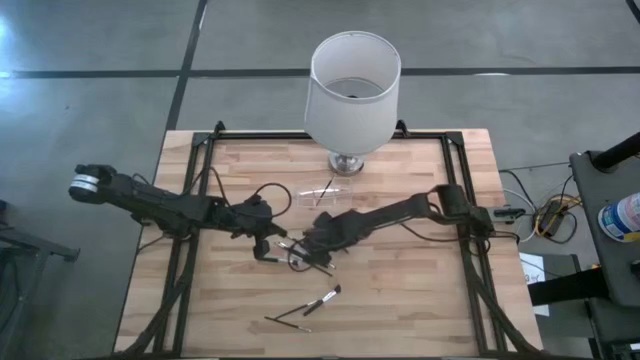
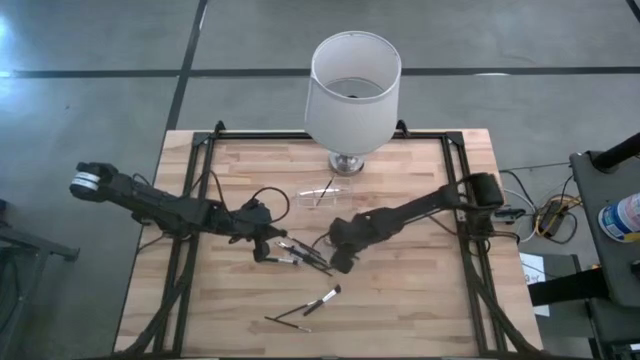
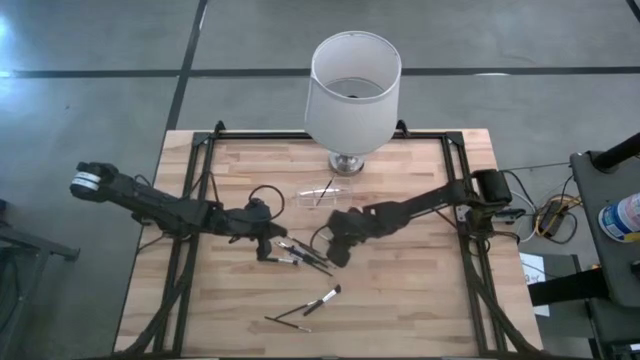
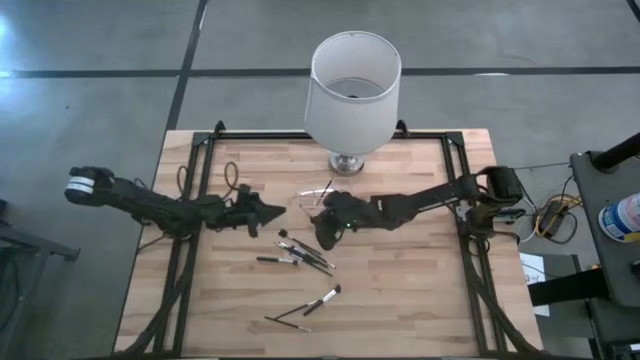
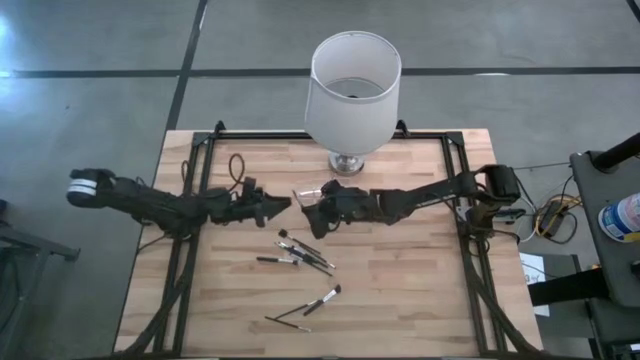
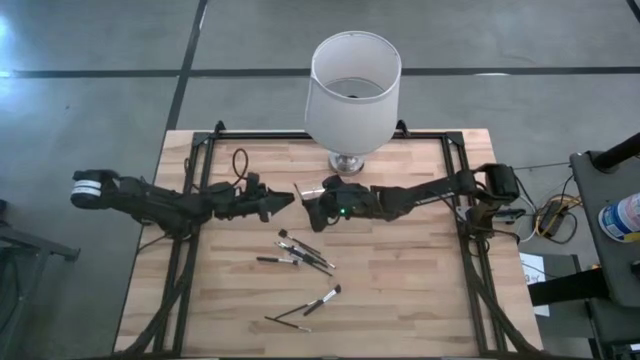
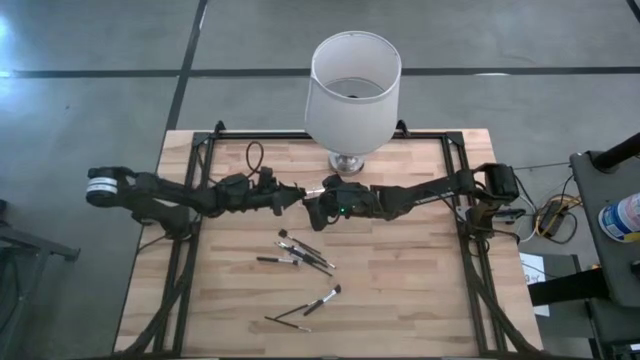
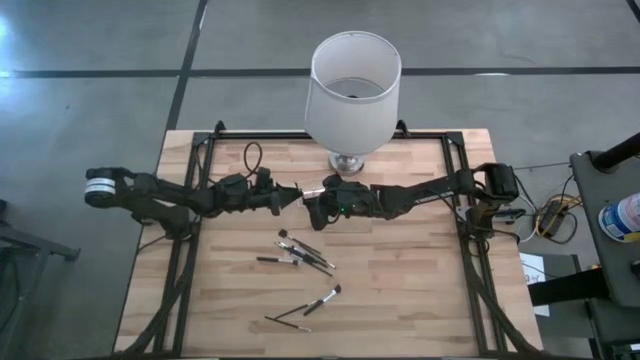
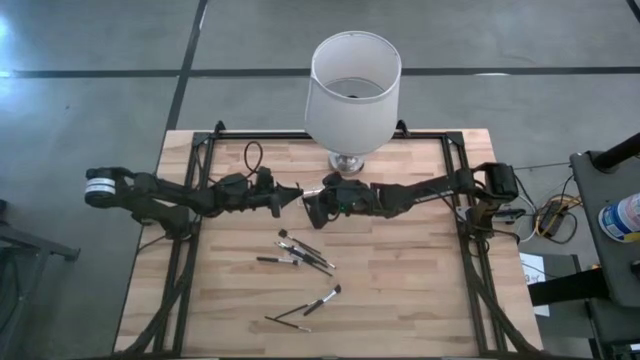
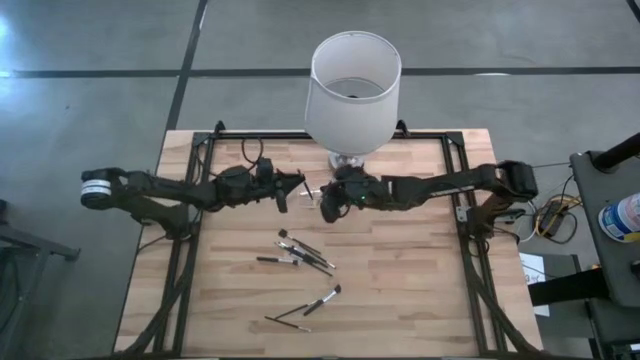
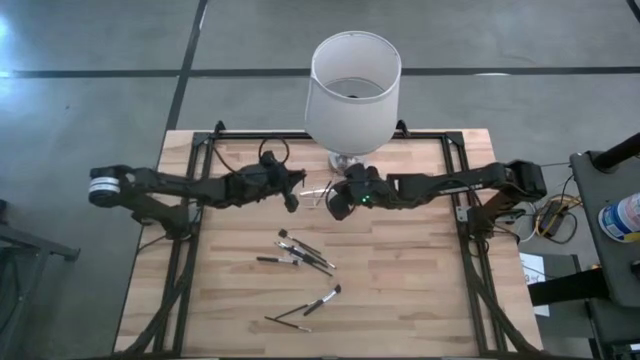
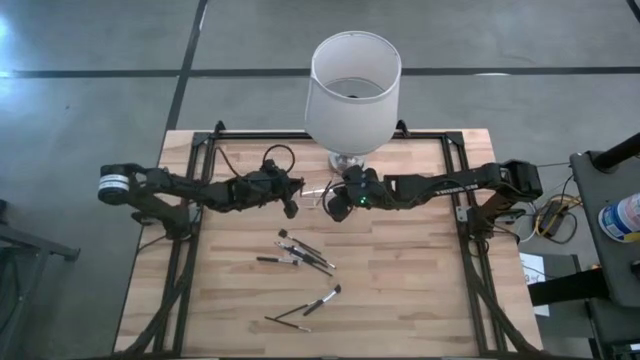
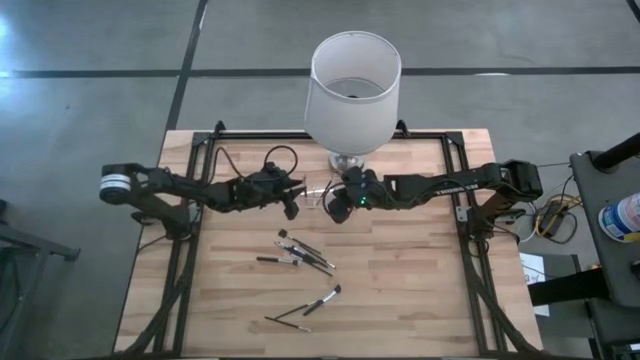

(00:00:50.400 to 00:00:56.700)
Task: Put items in baskets/containers
Put the eyeshadow brush into the transparent organizer

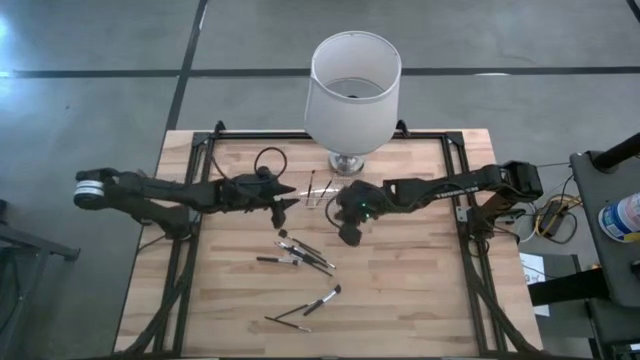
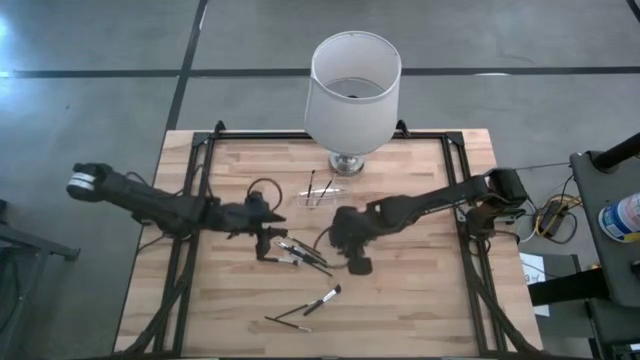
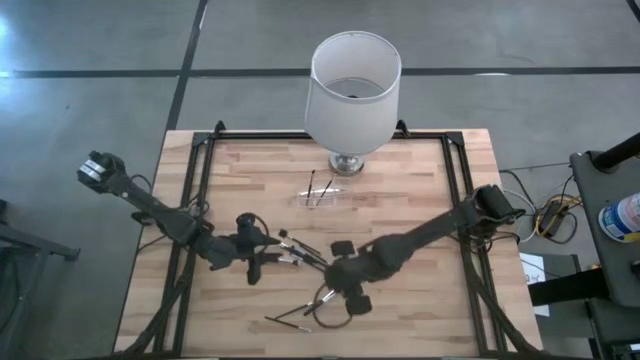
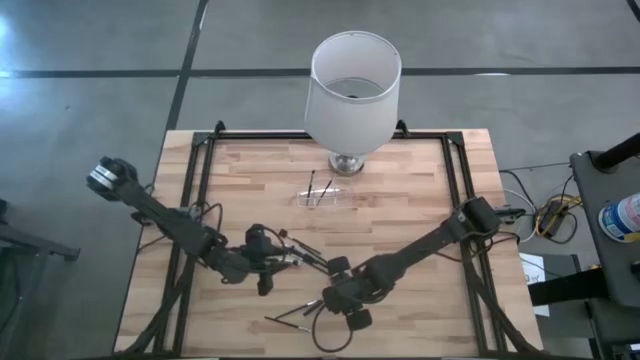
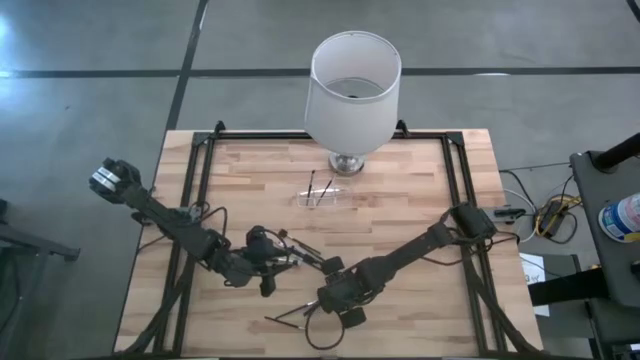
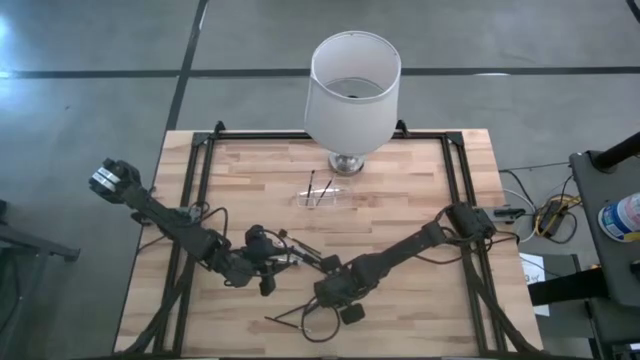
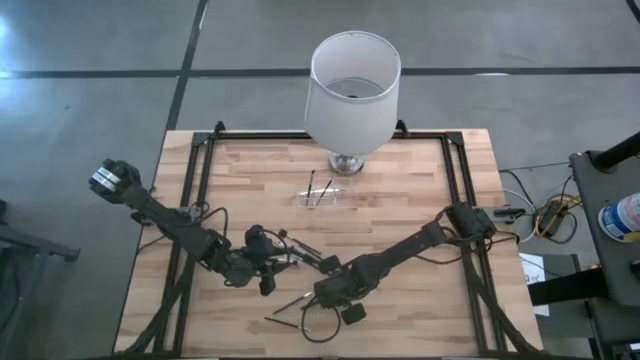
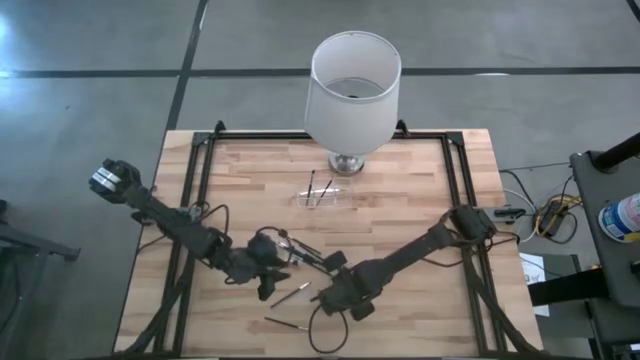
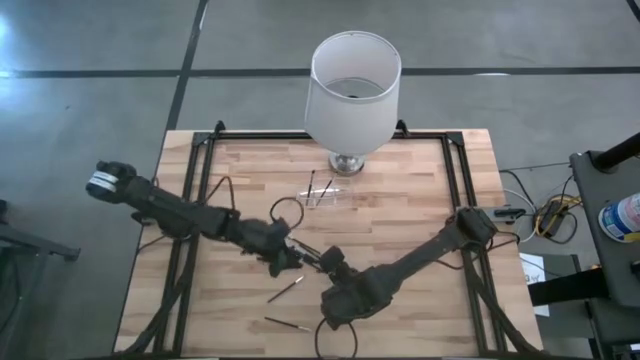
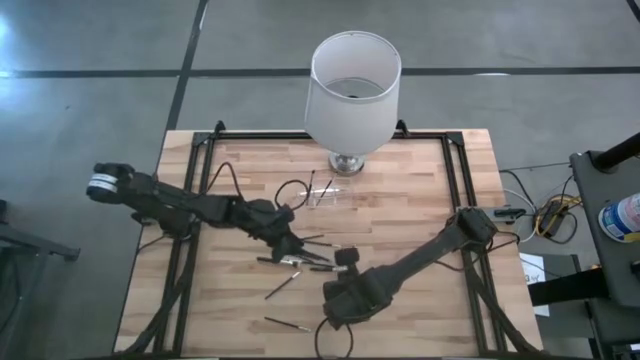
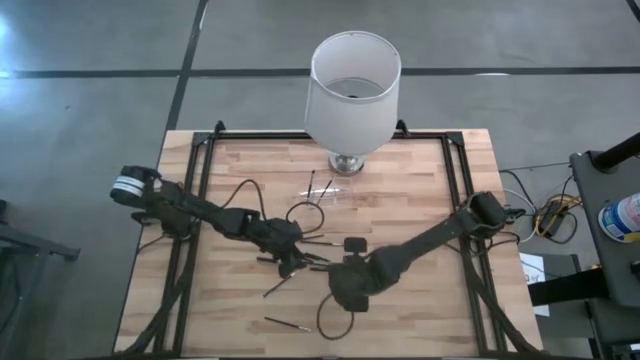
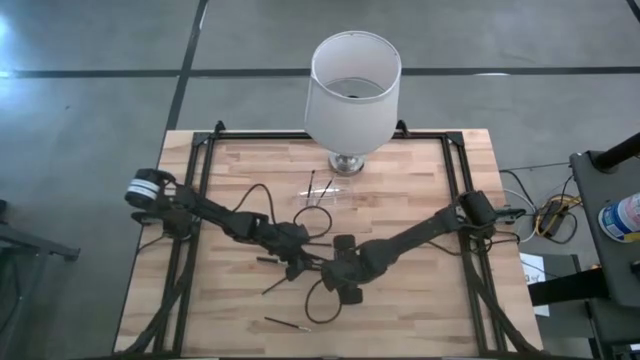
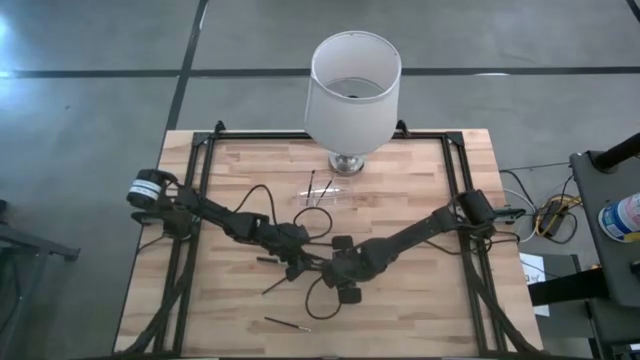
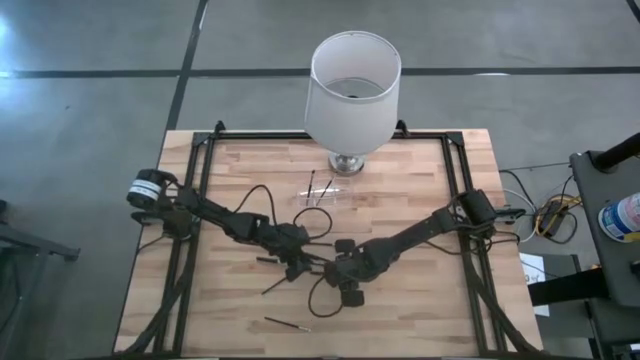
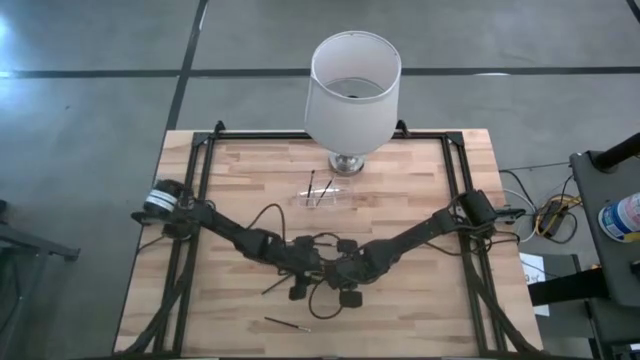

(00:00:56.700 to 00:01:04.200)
Put the powder brush into the transparent organizer

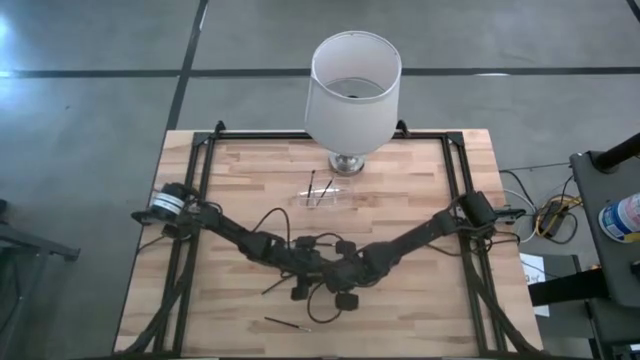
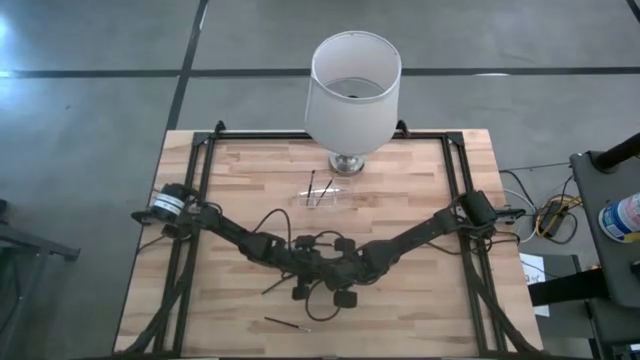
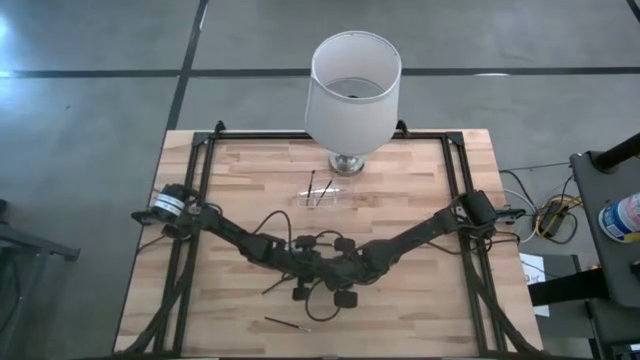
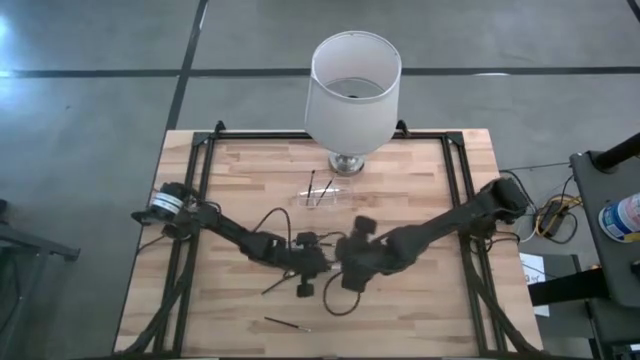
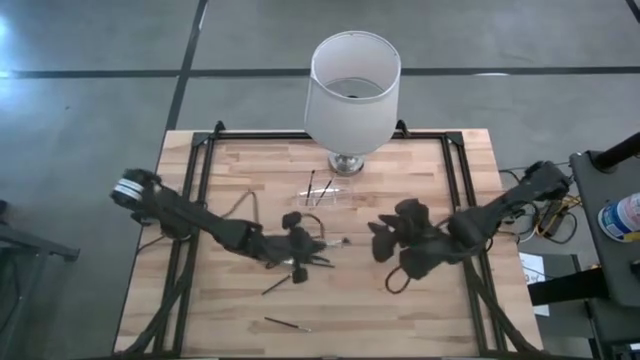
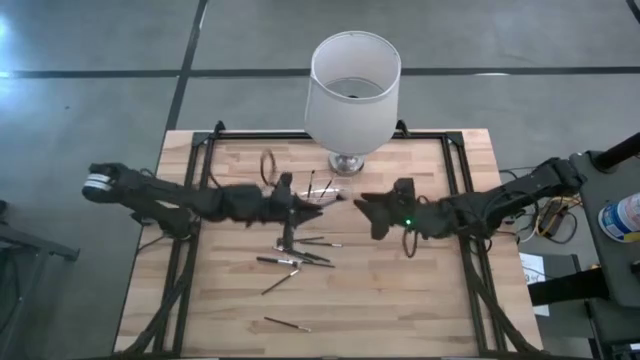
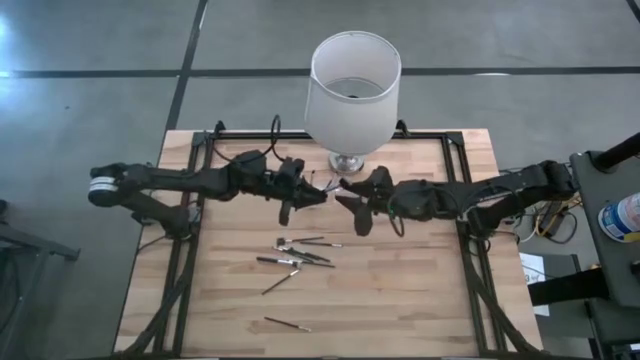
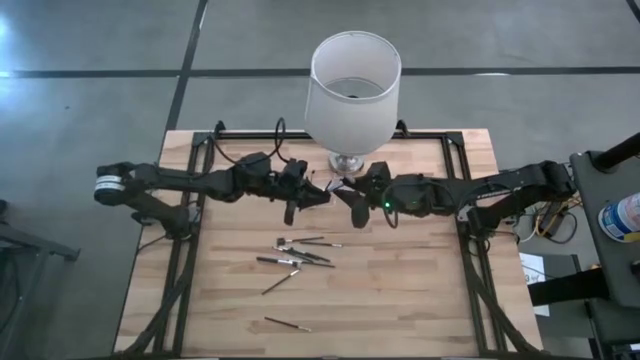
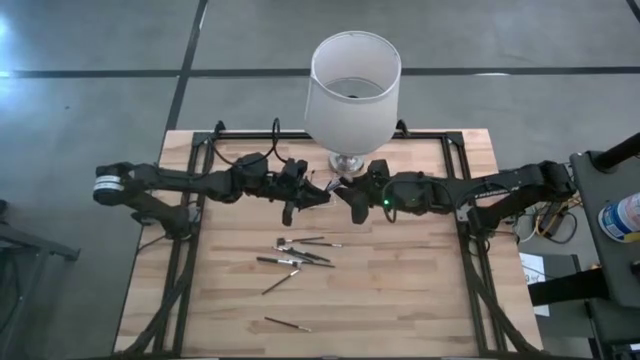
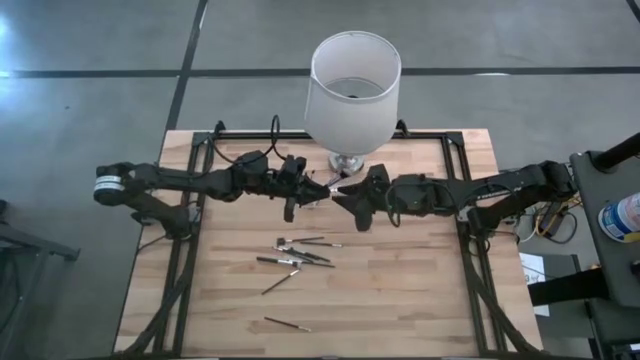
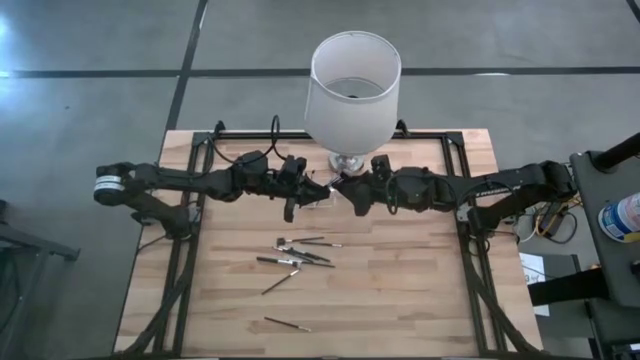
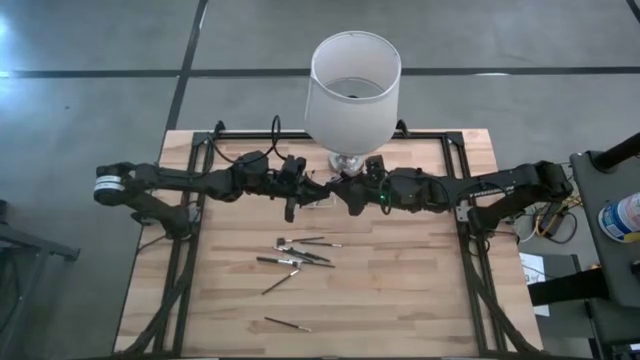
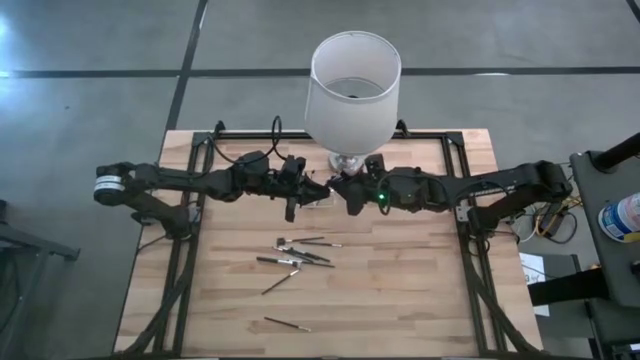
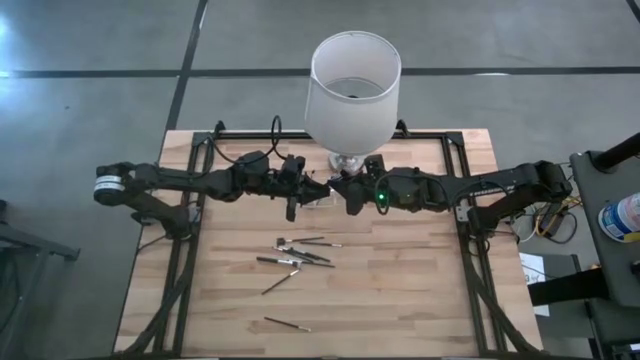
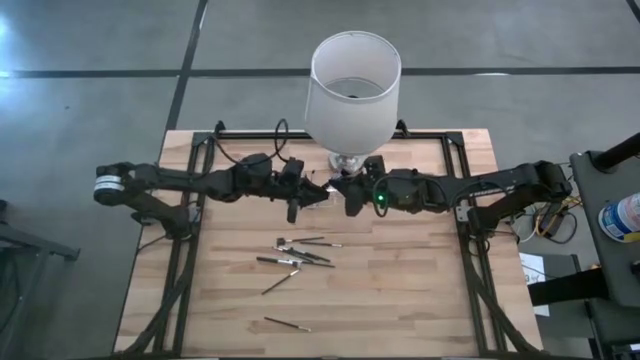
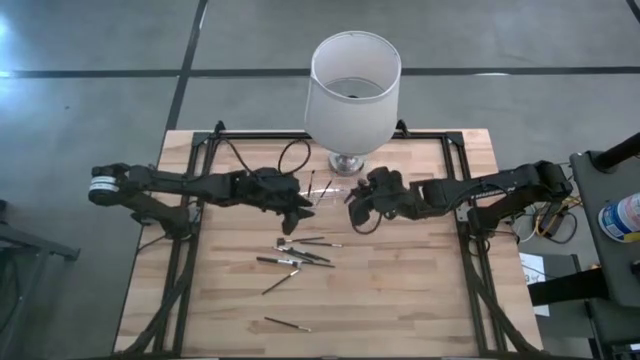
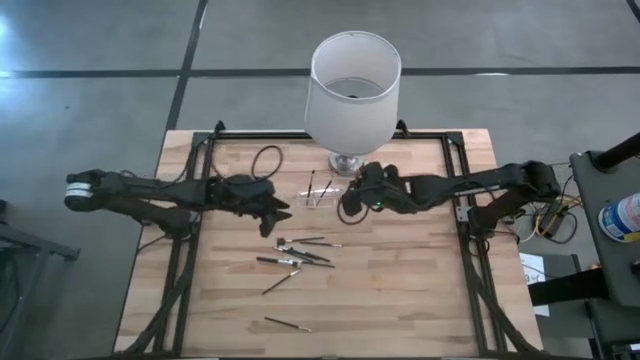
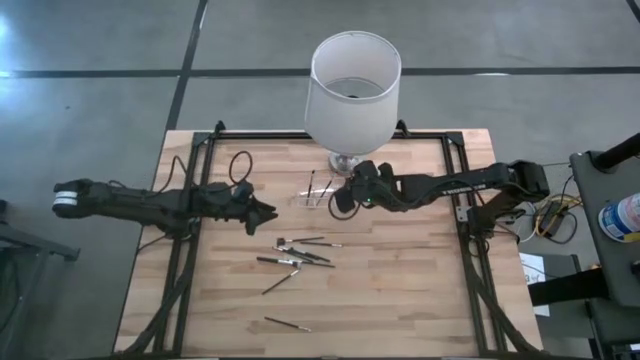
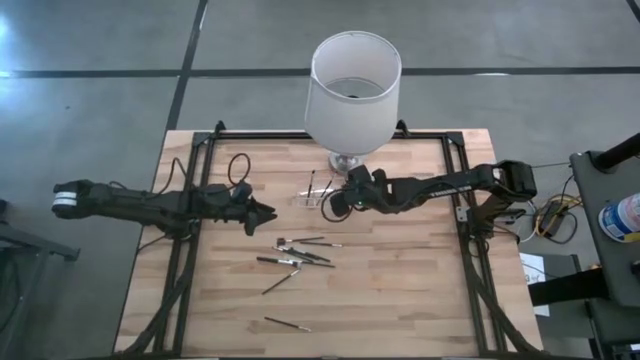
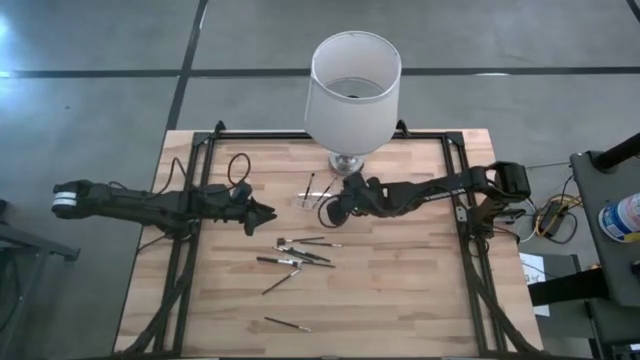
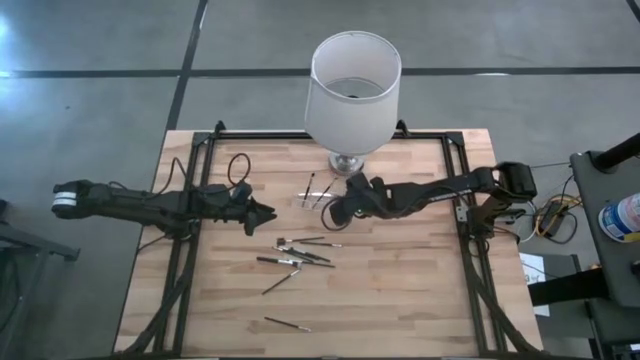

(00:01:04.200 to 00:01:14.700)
Put the powder brush into the transparent organizer
